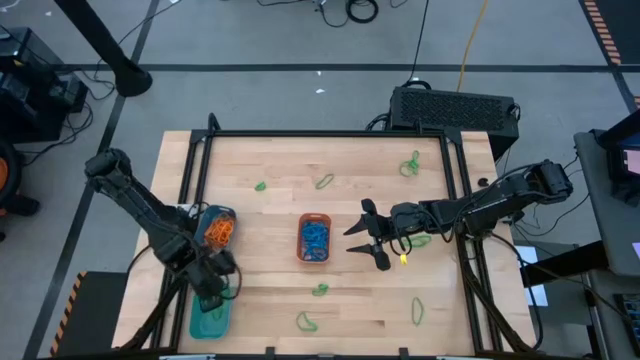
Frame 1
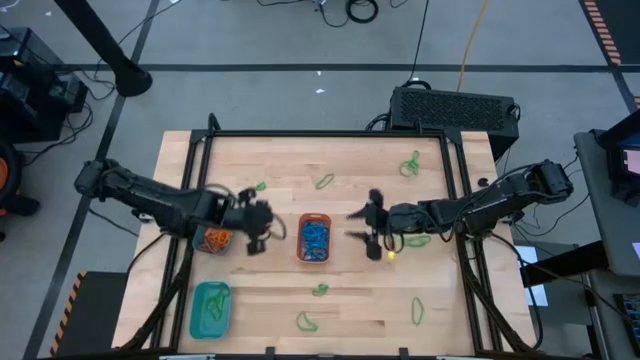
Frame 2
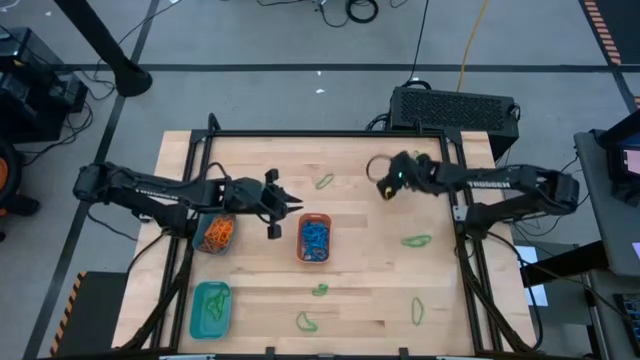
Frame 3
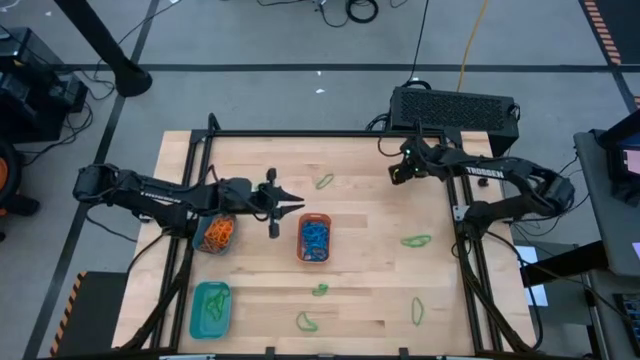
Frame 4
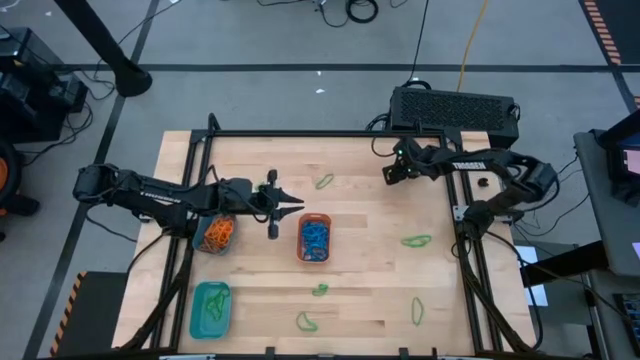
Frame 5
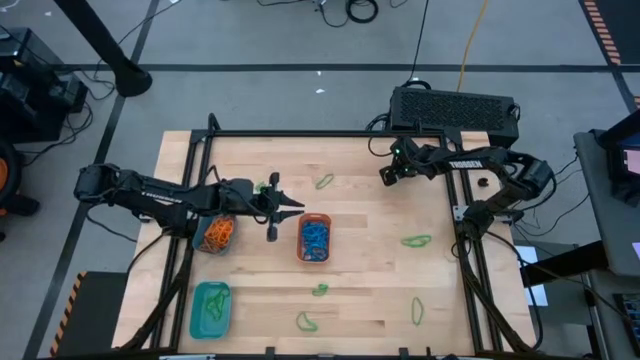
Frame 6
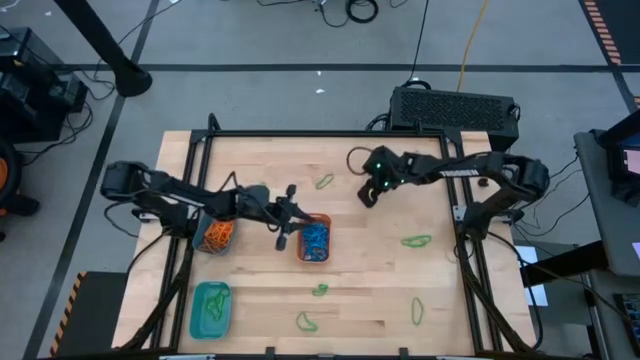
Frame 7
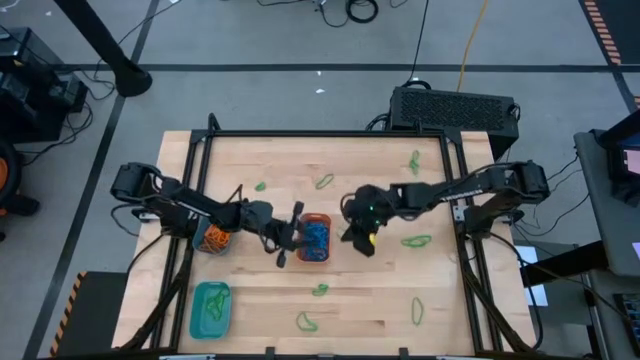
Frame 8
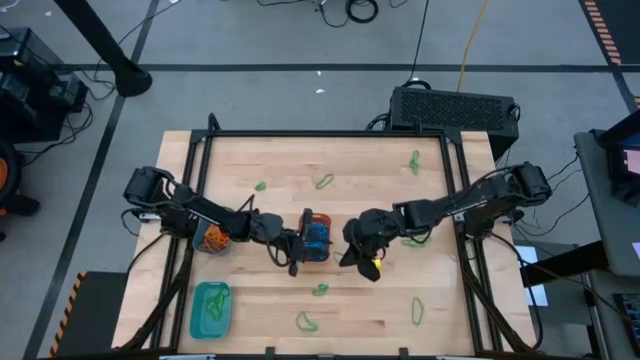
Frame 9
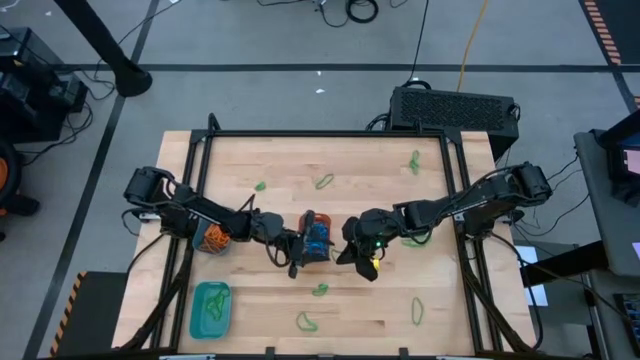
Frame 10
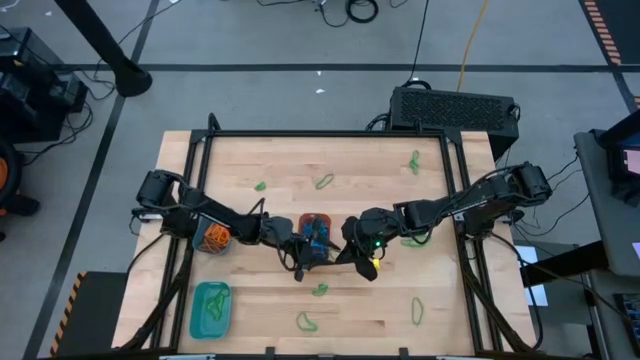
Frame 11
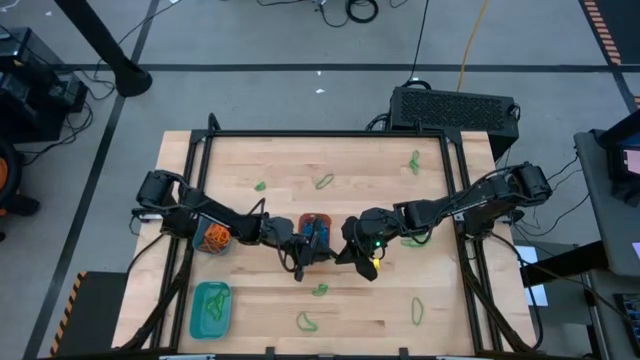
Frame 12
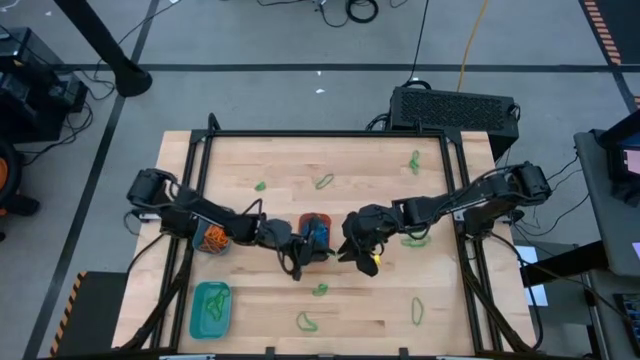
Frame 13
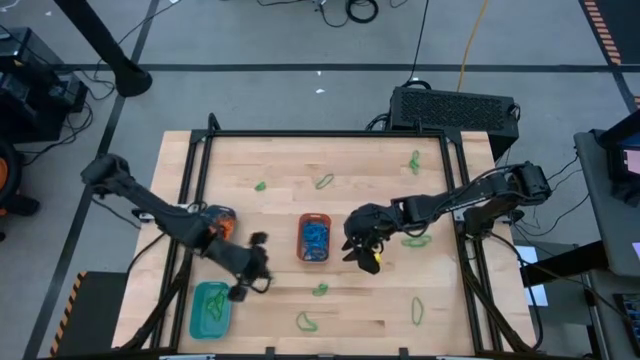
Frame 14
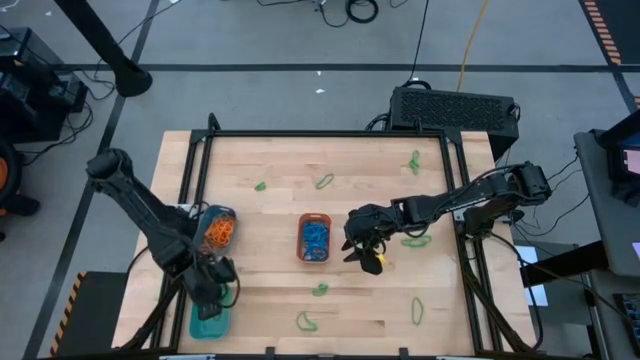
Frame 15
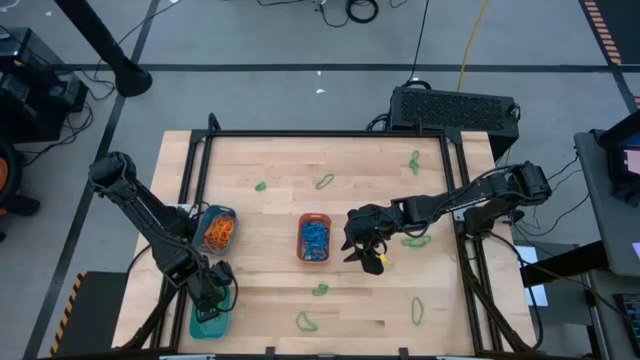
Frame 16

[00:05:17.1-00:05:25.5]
Task: Sort rubber bands into baskets
Put the green rubber band into the green bin

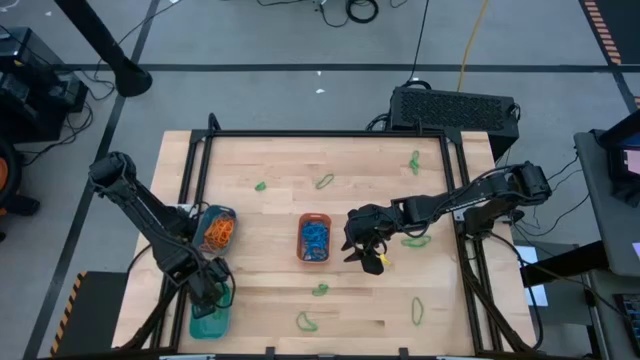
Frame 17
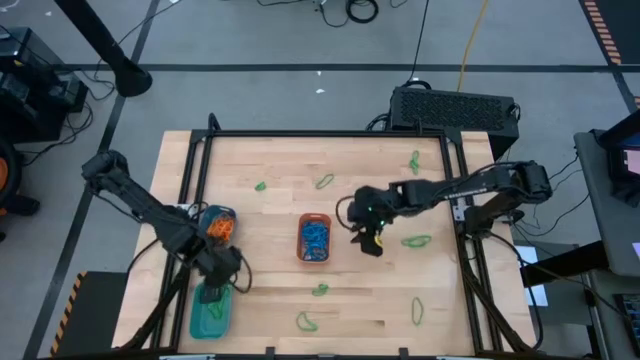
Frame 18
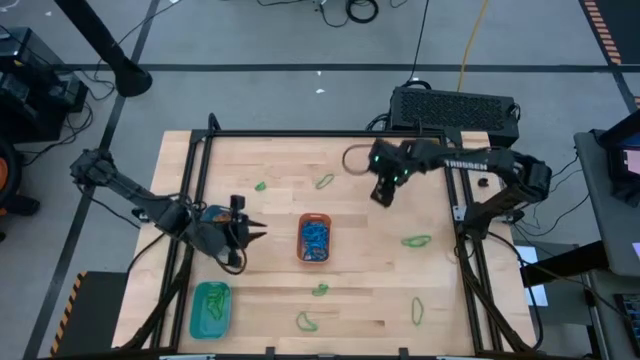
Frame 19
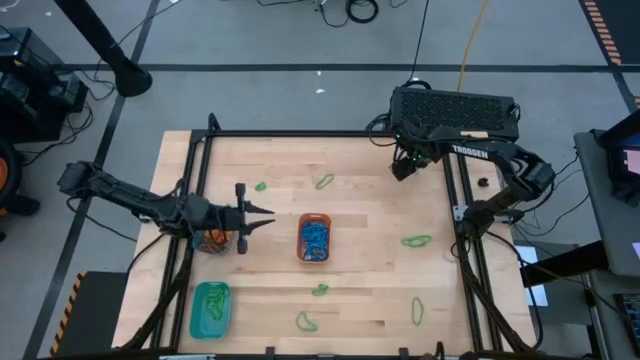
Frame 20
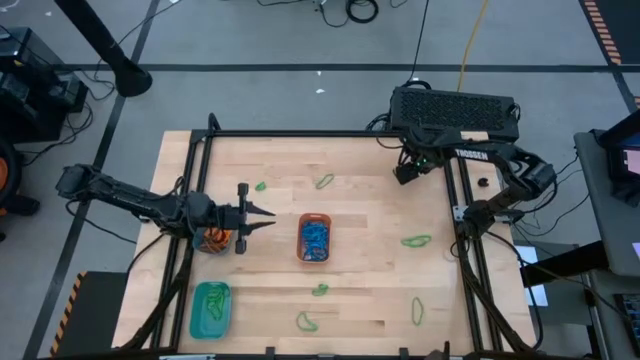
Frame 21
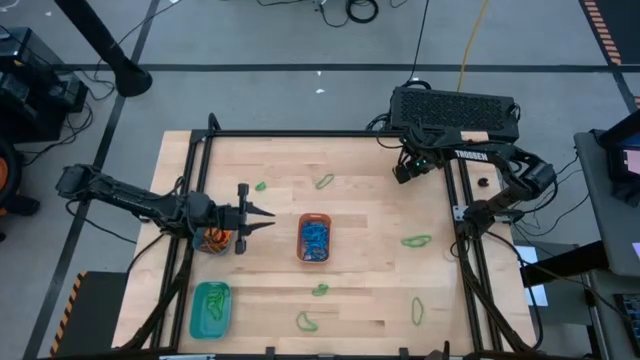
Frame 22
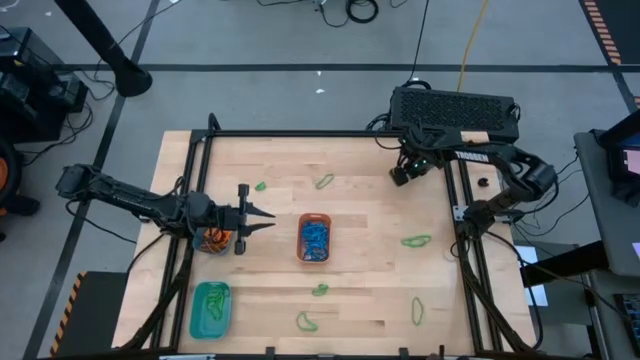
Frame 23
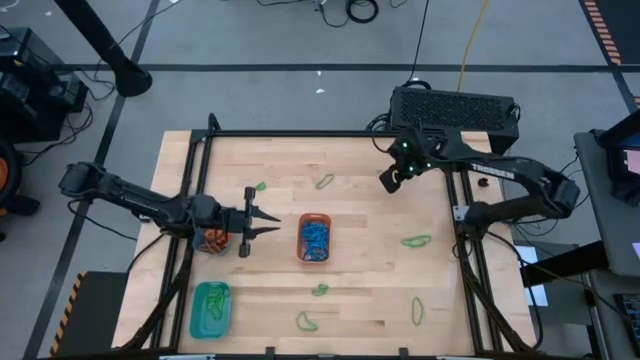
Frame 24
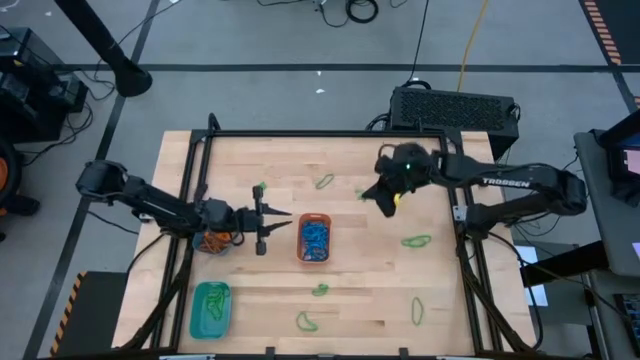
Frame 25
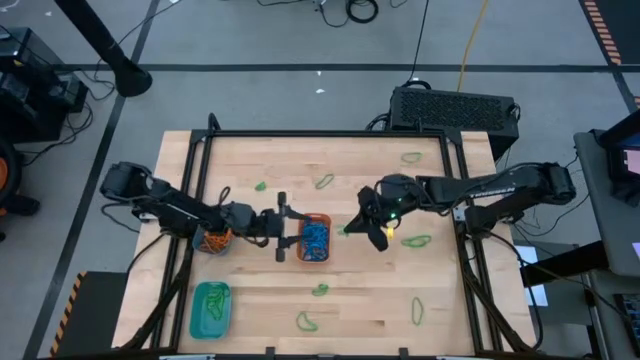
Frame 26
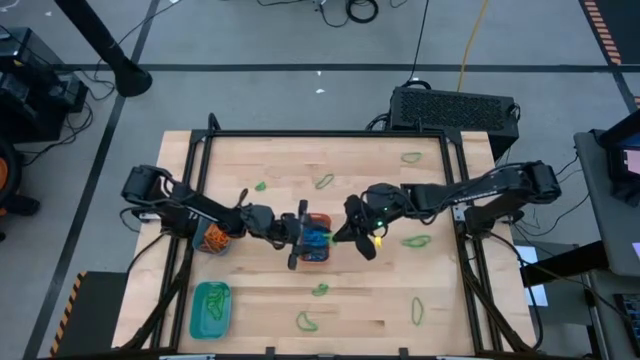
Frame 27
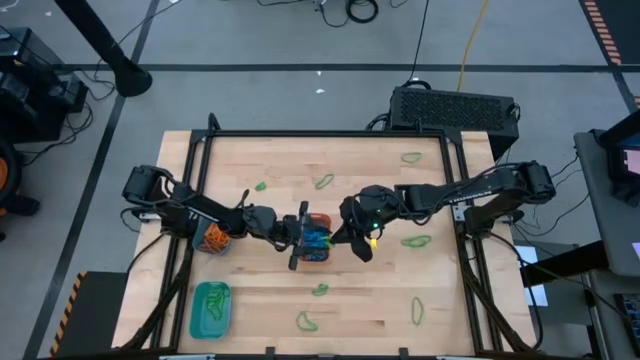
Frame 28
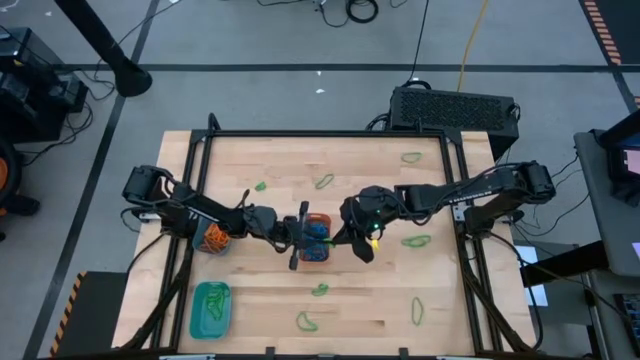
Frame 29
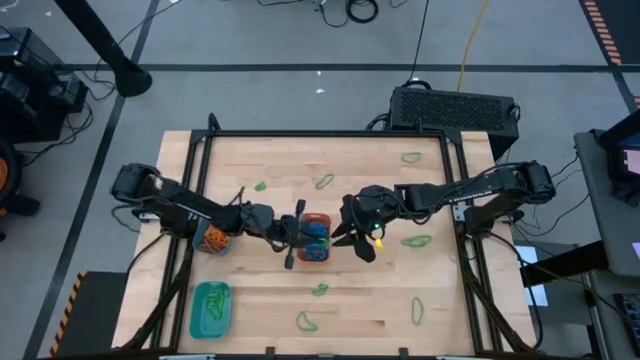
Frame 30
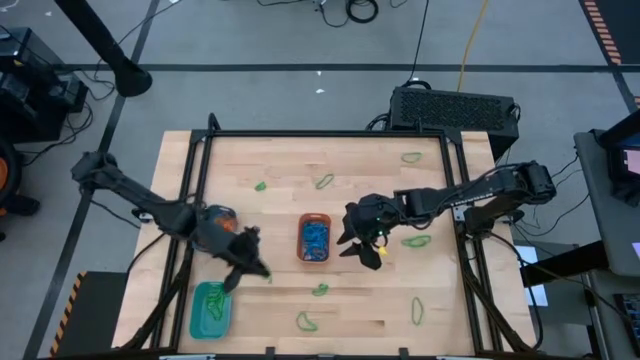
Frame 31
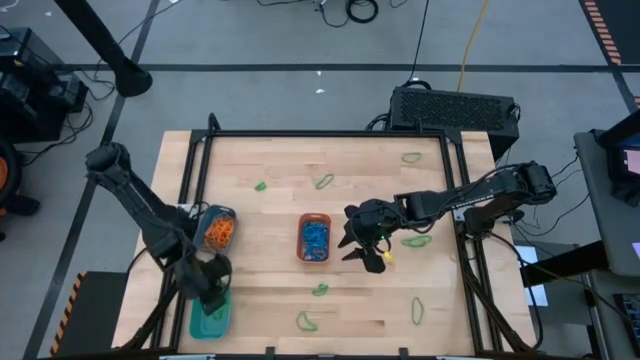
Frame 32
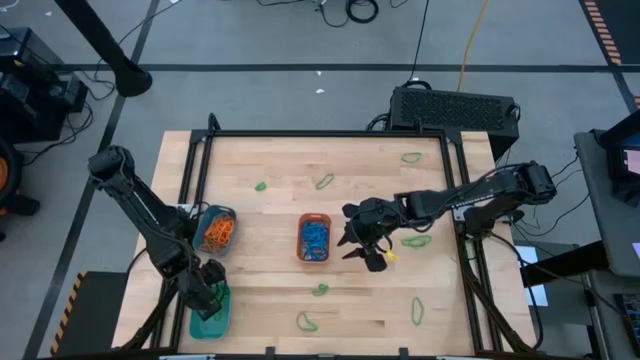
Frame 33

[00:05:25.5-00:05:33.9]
Put the green rubber band into the green bin

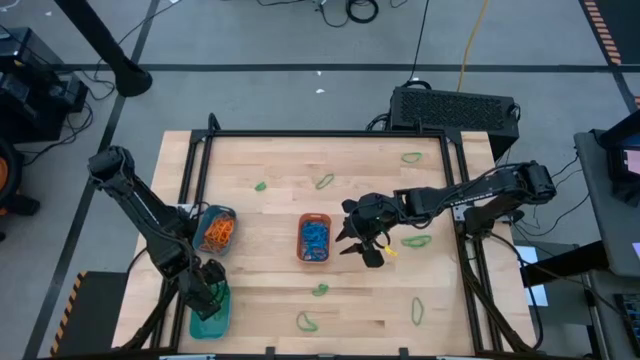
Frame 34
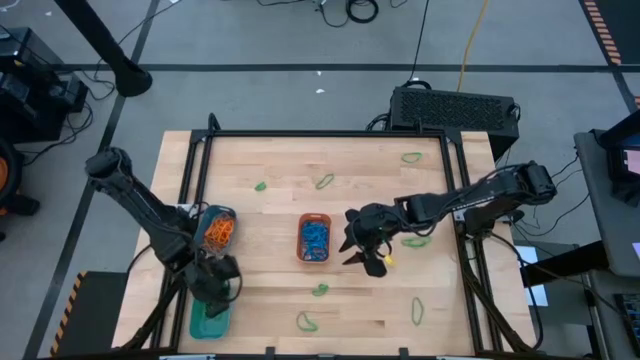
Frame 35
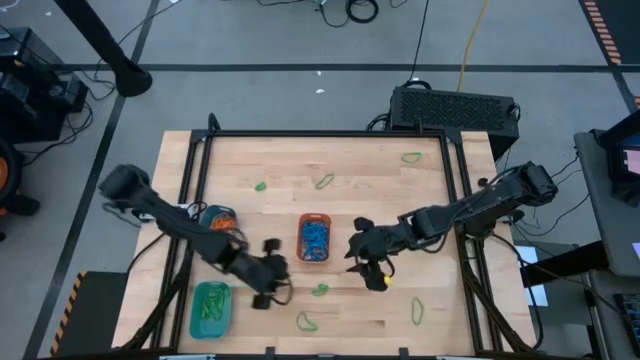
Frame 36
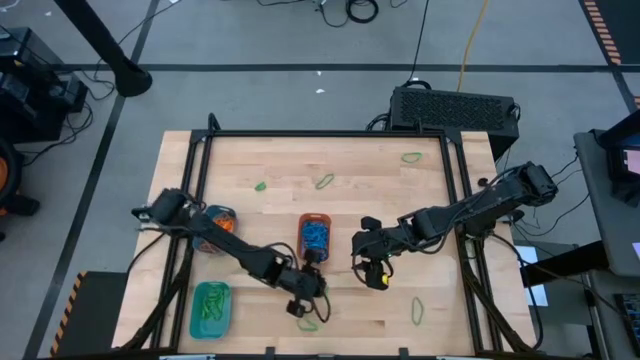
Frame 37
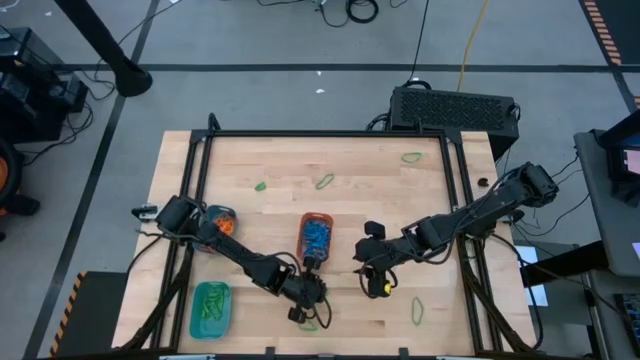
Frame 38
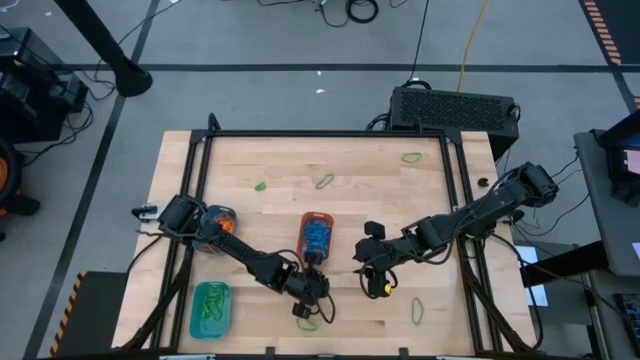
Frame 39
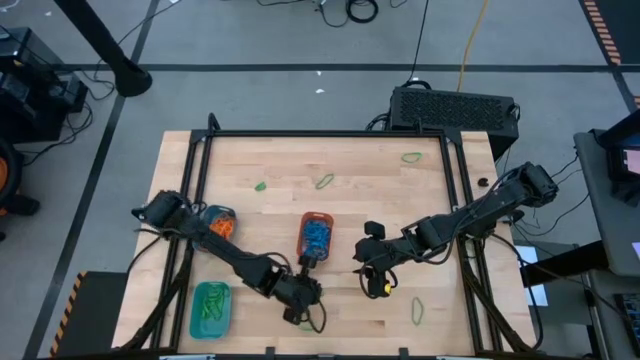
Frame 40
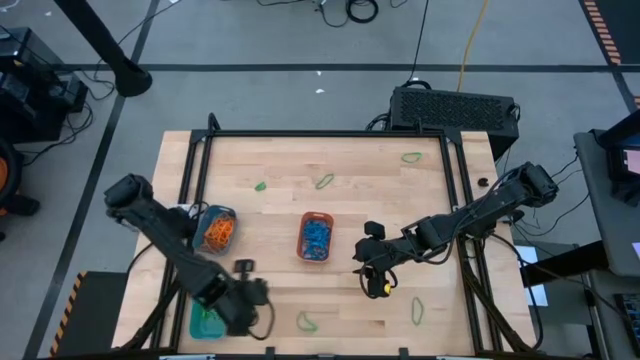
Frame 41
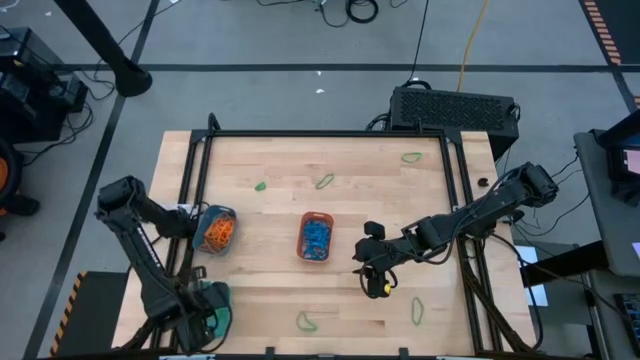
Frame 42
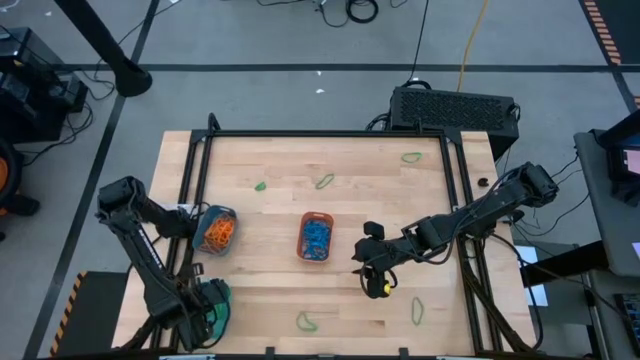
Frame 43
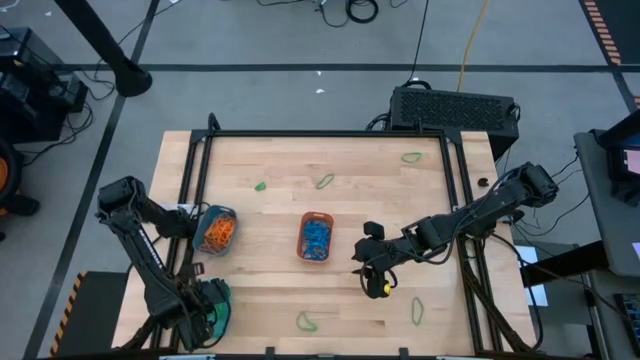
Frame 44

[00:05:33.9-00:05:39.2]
Put the green rubber band into the green bin
